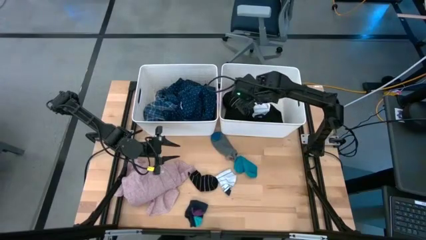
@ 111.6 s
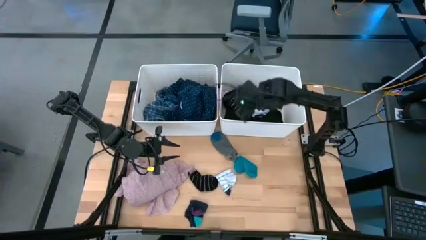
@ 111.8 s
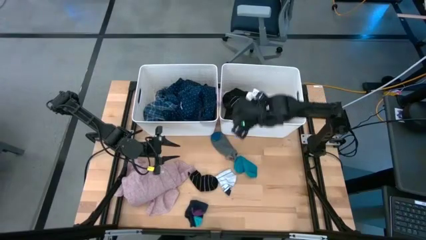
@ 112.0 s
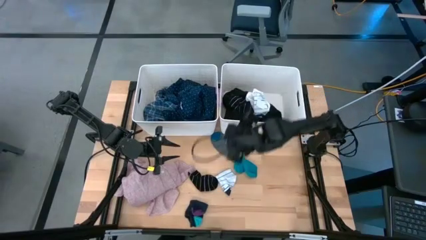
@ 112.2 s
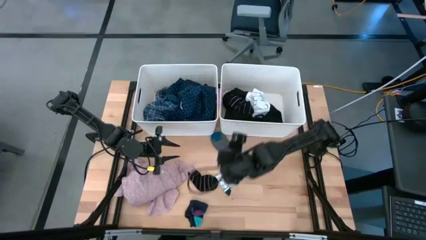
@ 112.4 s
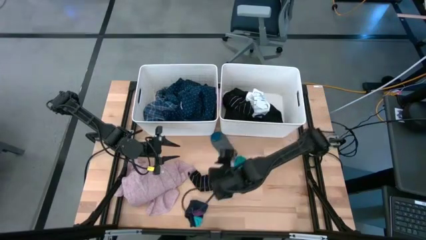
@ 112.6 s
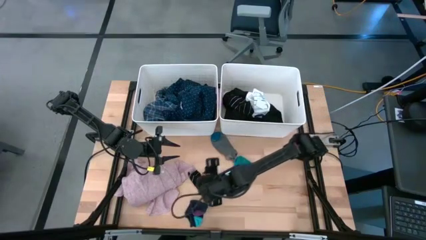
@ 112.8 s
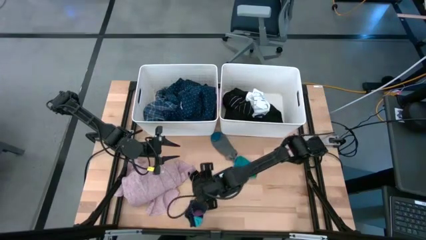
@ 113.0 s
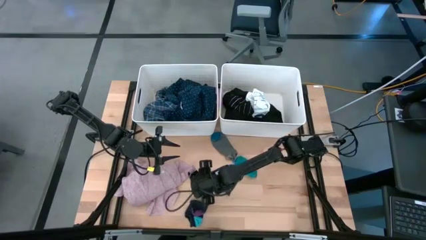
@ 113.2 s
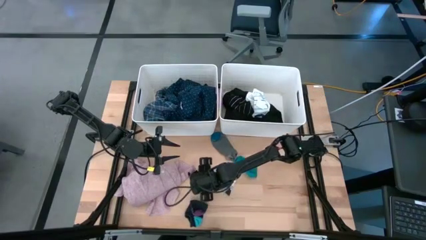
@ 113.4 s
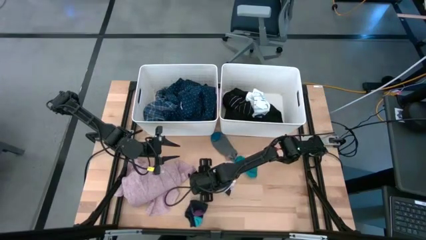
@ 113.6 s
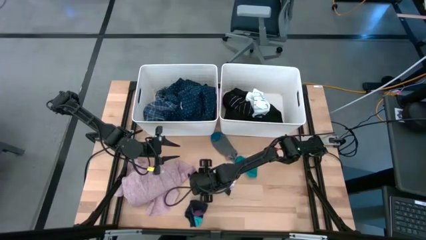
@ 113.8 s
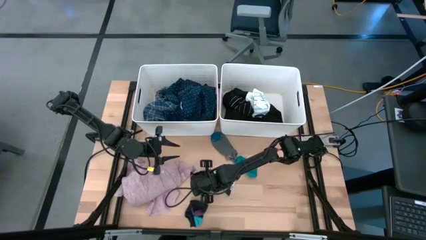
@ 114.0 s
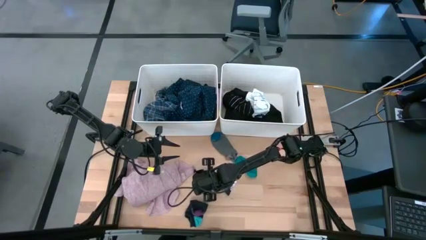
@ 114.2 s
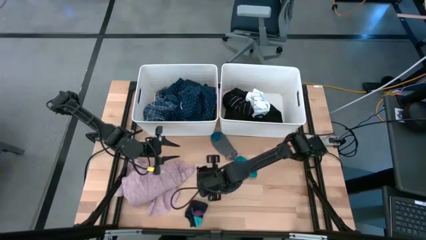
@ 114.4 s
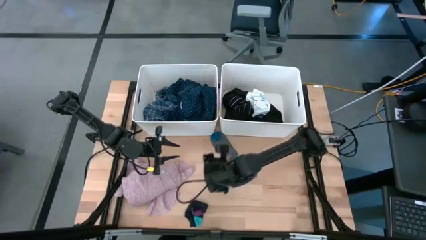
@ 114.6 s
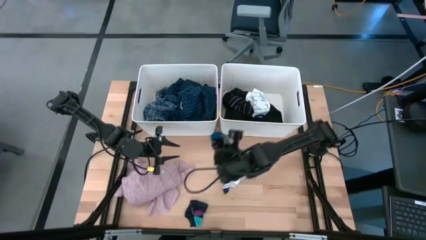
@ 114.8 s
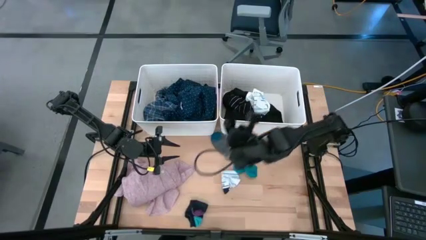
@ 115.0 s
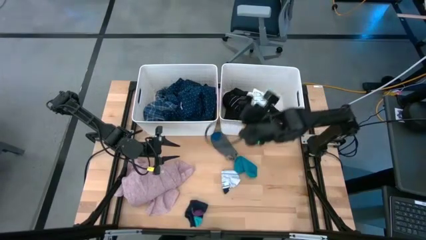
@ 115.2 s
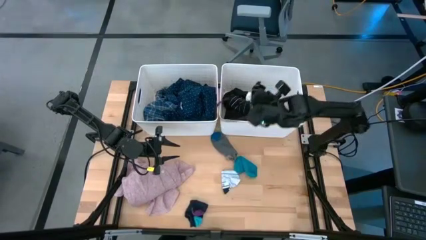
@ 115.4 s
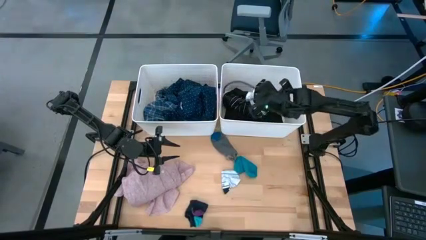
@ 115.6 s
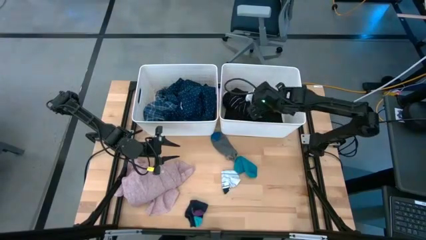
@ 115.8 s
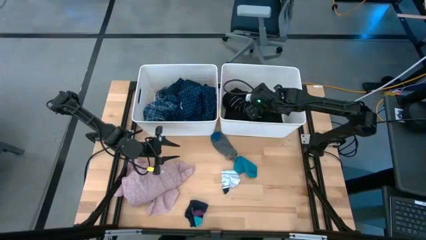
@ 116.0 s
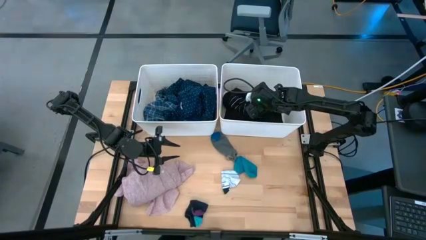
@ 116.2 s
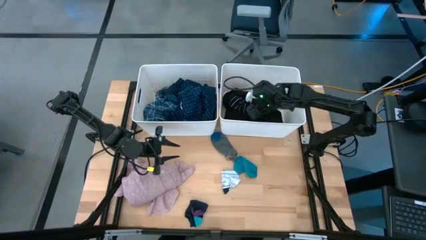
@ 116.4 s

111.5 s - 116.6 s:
Task: Sort clothes
Put the black sock into the right white bin

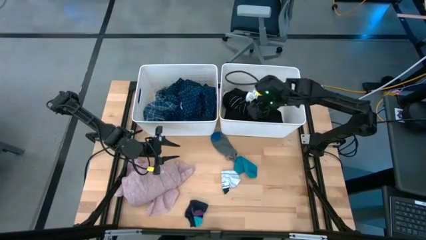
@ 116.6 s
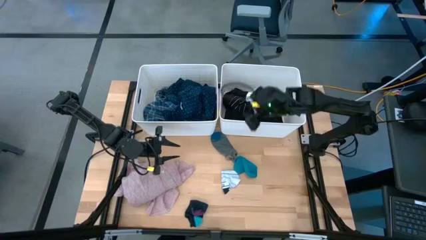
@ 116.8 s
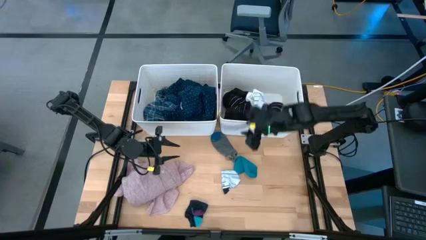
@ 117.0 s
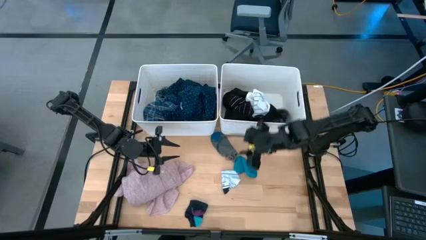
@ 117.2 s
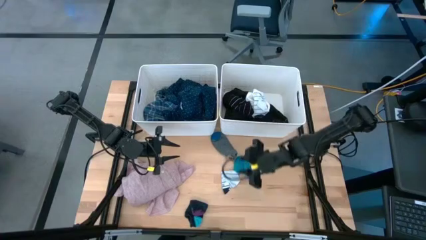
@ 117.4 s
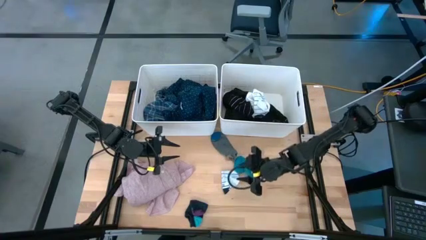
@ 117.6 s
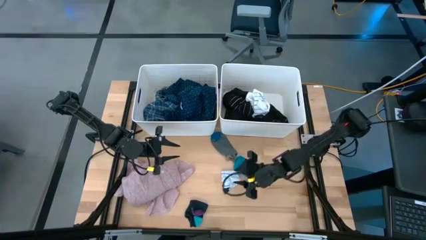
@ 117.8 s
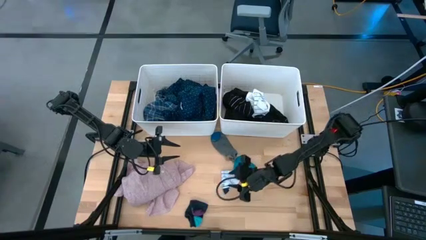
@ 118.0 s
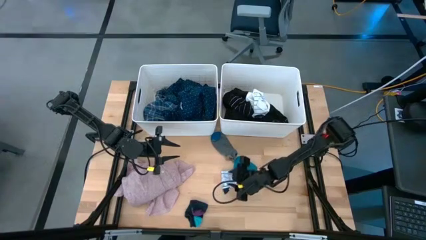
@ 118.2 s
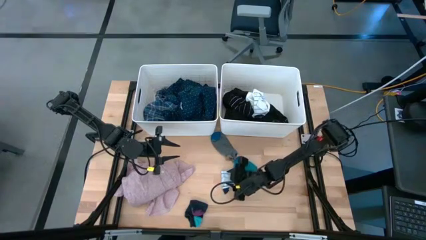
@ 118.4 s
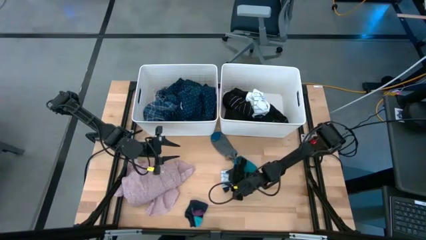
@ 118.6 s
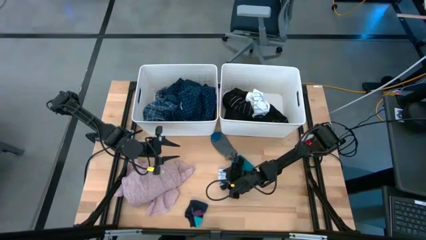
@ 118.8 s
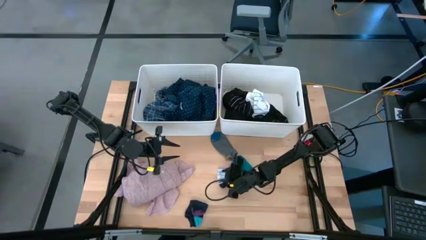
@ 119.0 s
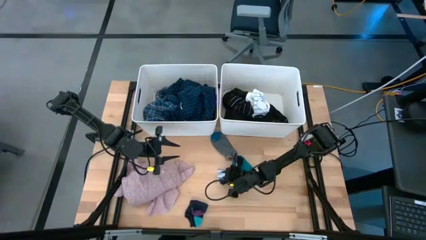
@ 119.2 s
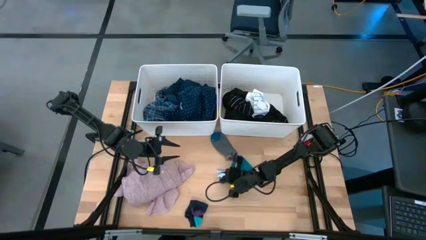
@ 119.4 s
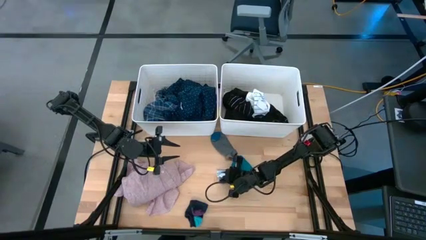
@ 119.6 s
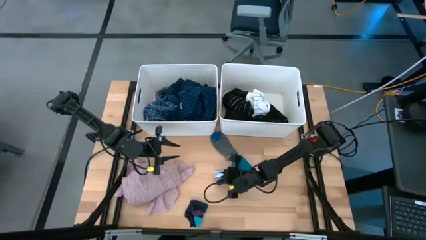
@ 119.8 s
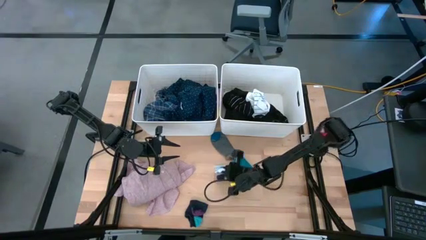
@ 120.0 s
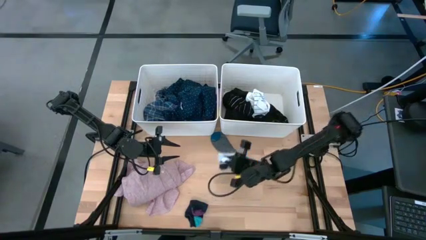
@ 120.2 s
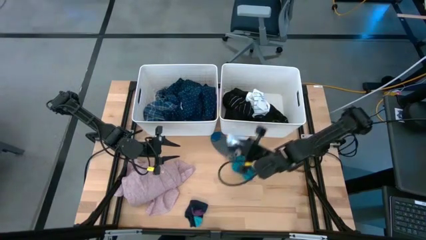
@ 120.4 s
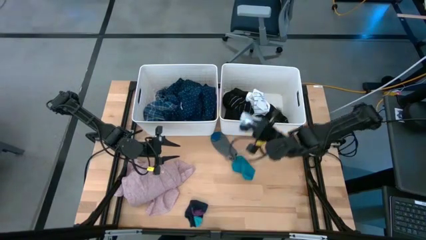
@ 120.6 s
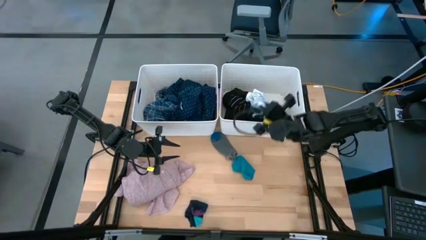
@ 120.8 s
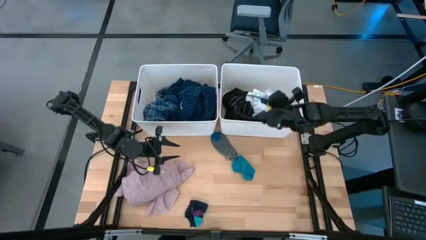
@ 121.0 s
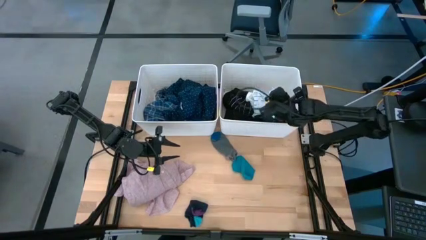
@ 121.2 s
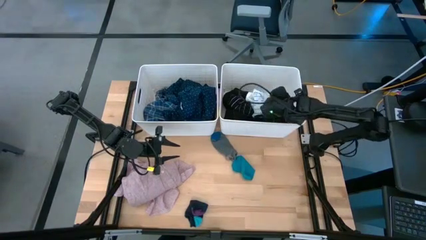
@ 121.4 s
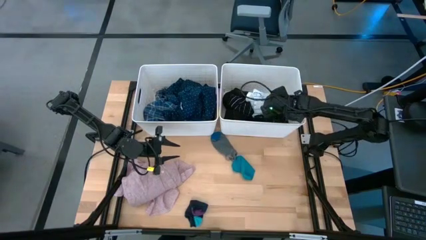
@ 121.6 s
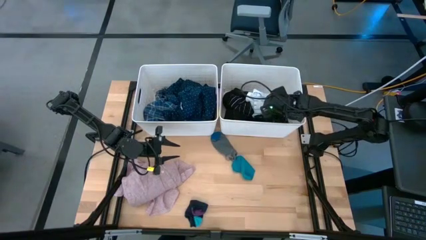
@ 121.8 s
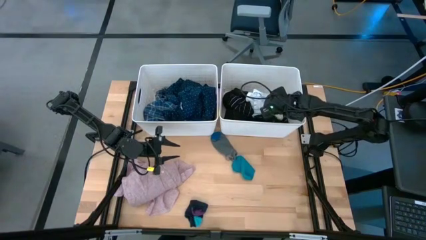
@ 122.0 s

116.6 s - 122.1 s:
Put the white blue sock into the right white bin

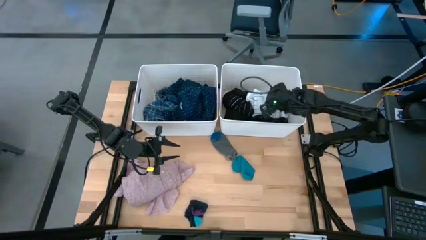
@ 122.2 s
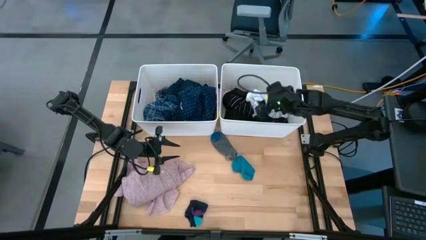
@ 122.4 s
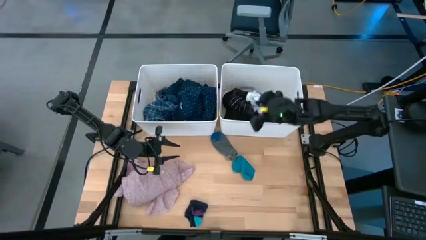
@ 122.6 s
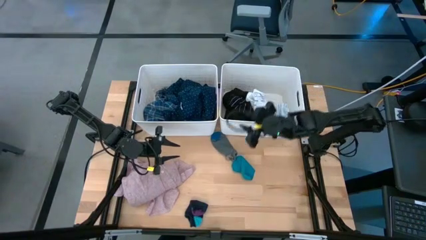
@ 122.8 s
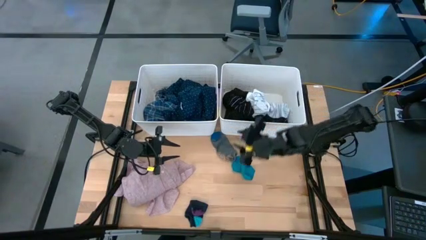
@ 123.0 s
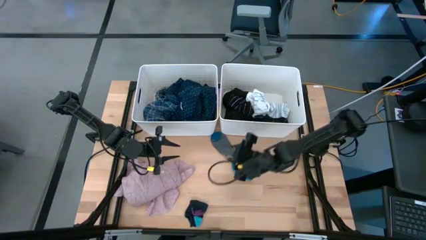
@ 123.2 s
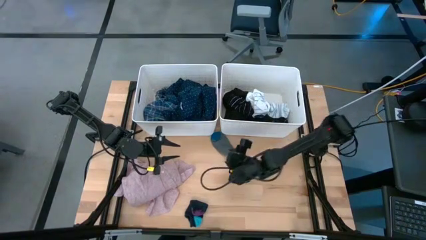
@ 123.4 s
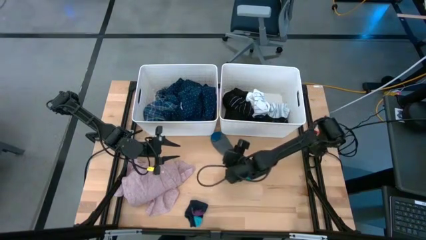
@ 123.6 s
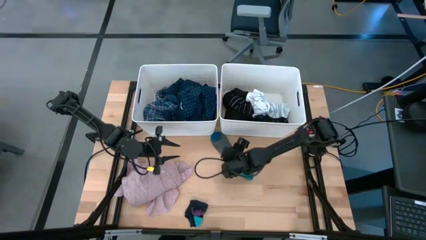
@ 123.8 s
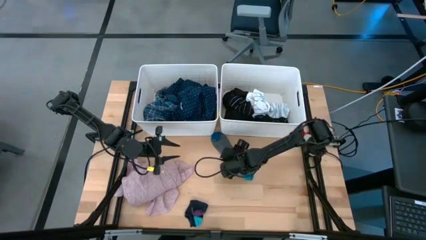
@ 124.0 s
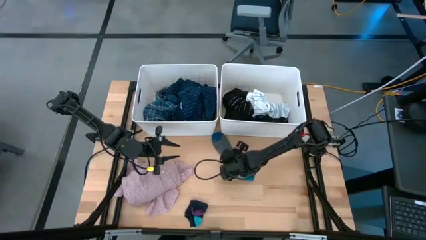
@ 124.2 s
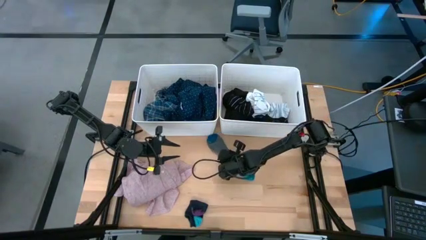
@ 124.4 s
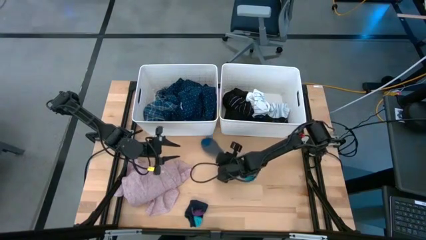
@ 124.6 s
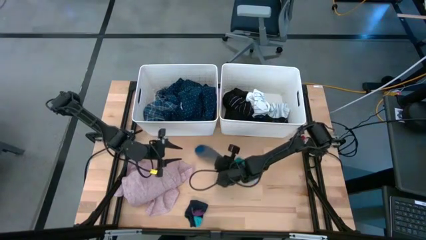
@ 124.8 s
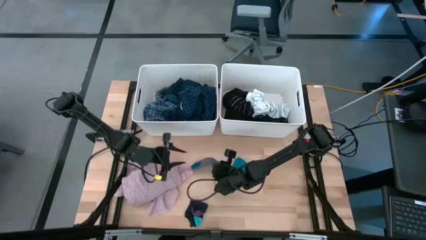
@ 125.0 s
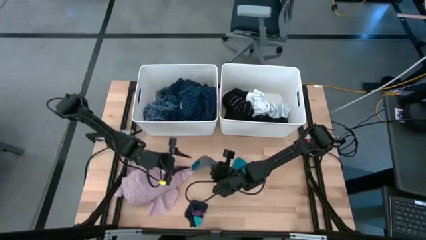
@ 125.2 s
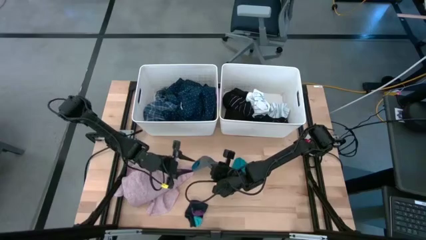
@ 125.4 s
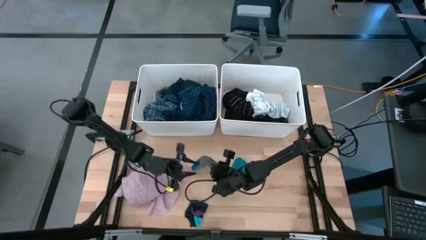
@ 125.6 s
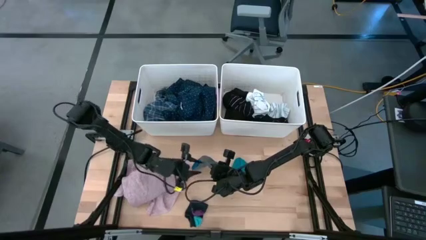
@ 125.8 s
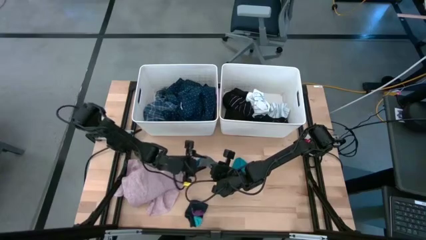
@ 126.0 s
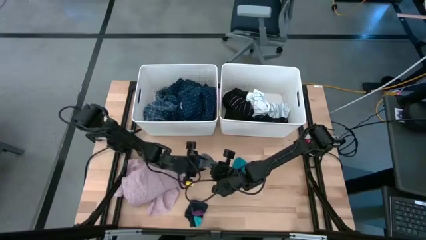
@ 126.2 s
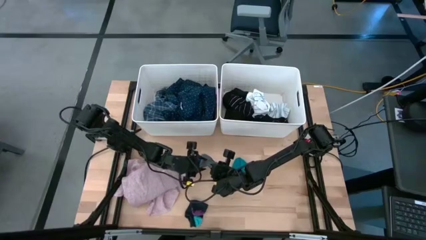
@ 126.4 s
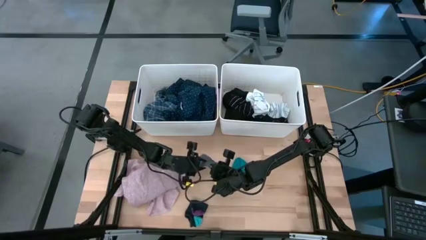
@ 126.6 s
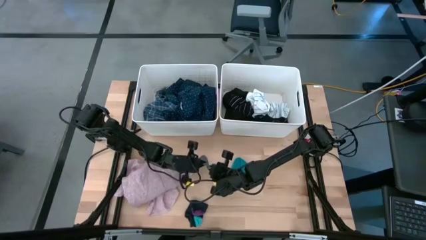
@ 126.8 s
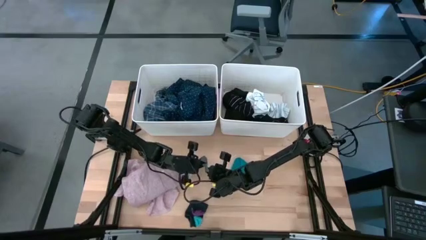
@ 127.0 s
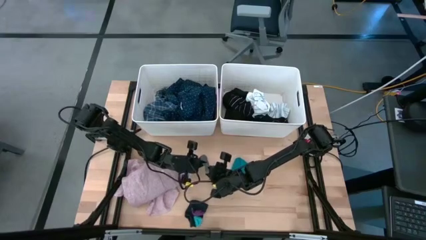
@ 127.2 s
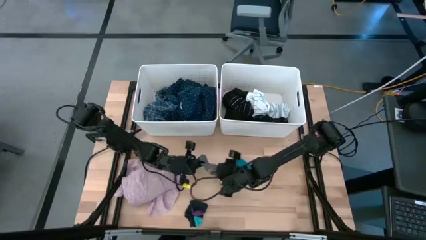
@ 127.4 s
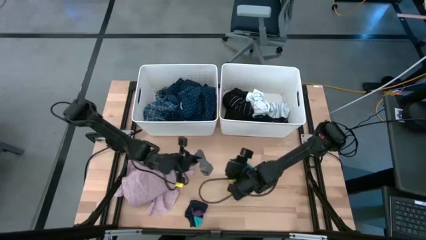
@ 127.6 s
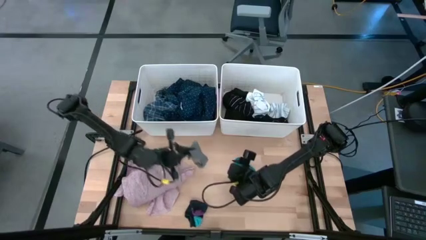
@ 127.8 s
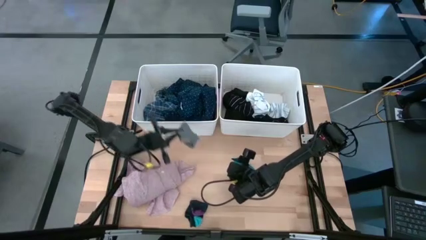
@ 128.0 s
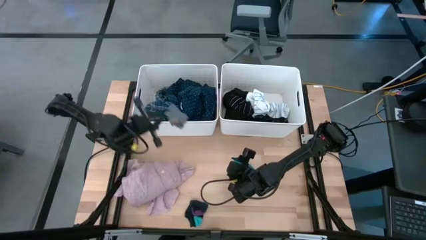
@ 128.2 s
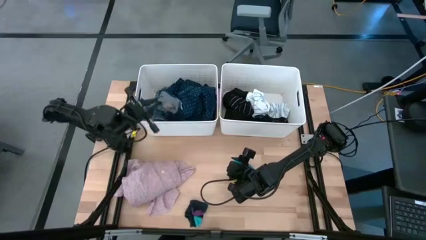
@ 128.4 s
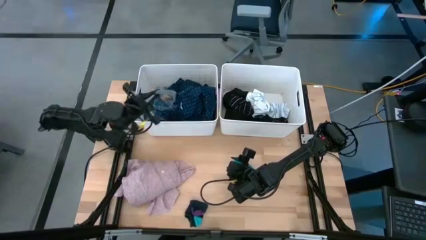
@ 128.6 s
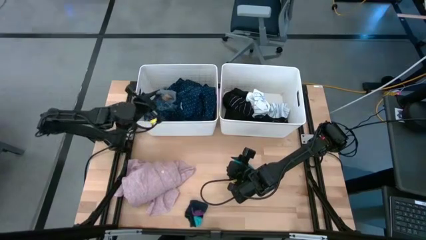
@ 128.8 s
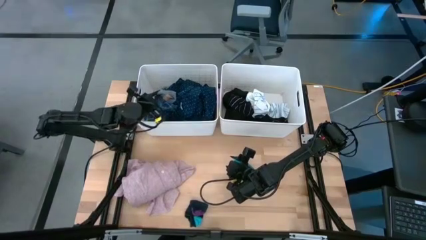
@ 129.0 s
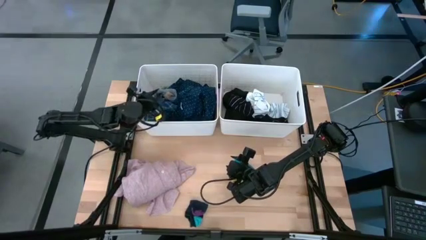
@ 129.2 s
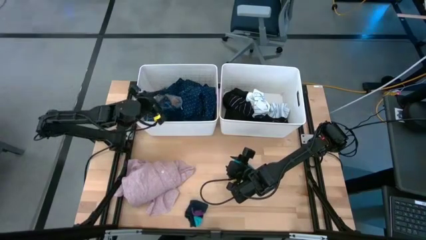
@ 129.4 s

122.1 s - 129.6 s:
Put the gray sock into the left white bin
